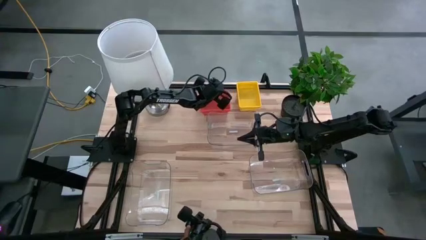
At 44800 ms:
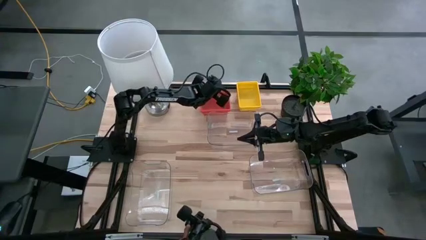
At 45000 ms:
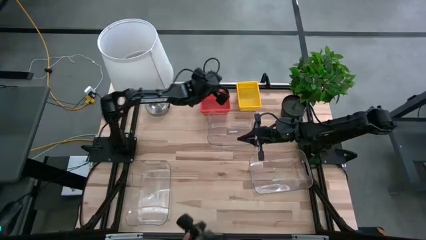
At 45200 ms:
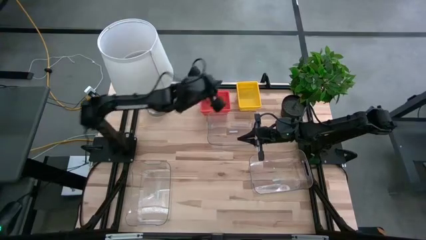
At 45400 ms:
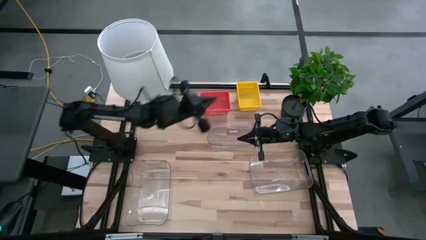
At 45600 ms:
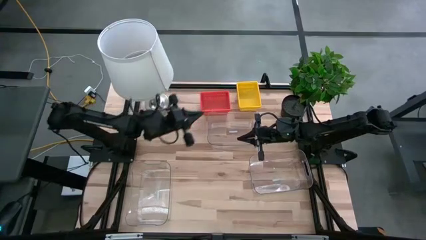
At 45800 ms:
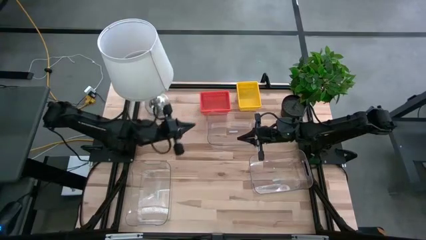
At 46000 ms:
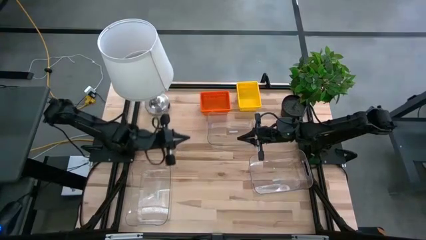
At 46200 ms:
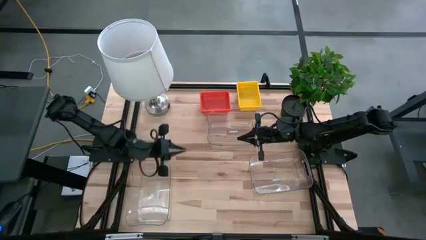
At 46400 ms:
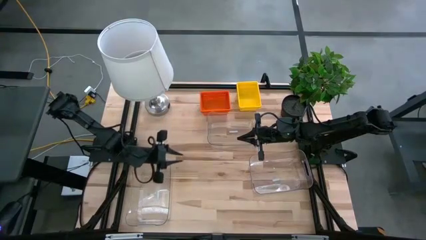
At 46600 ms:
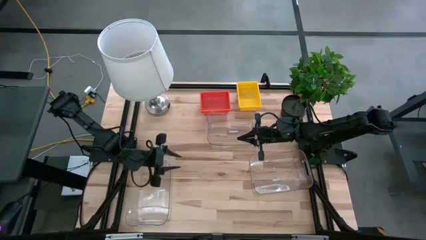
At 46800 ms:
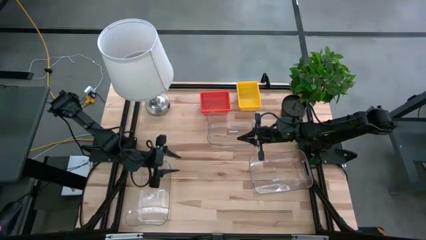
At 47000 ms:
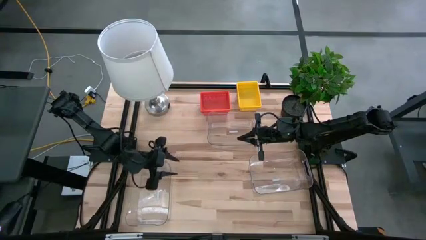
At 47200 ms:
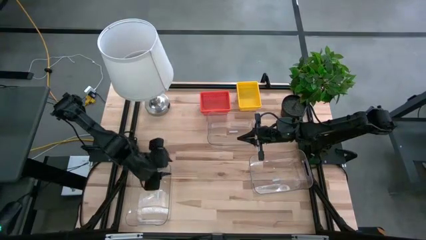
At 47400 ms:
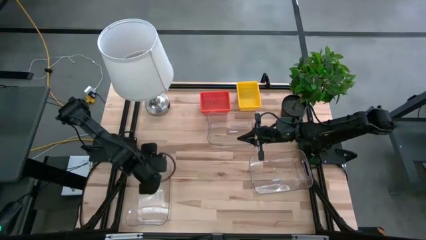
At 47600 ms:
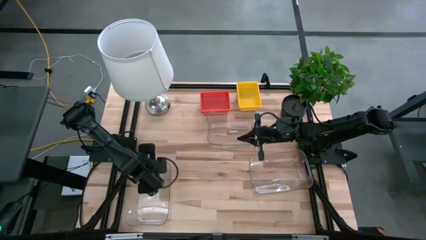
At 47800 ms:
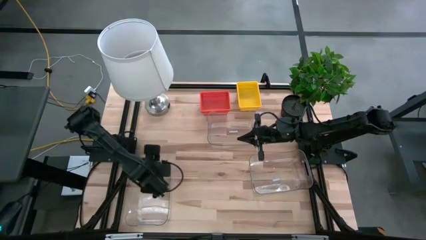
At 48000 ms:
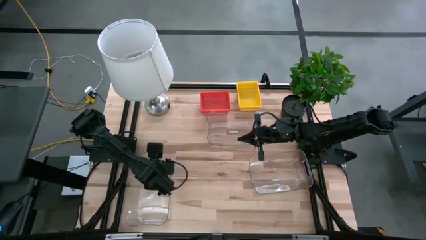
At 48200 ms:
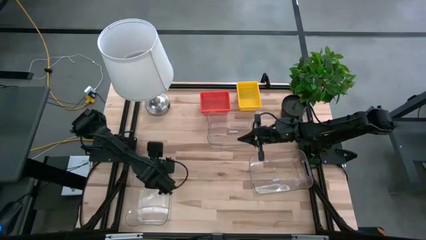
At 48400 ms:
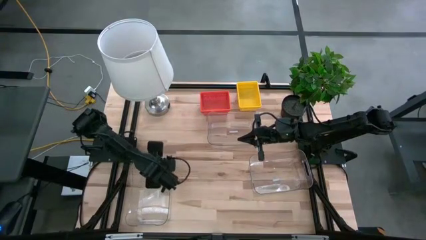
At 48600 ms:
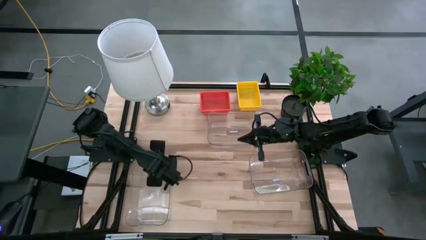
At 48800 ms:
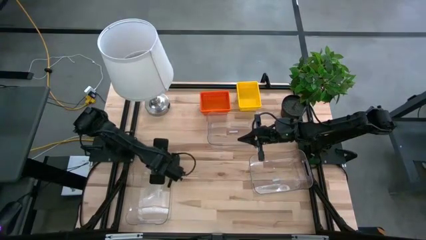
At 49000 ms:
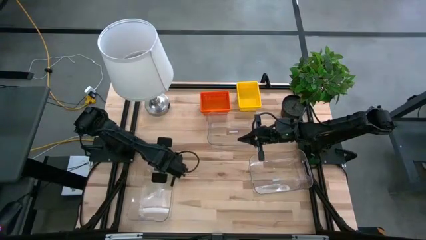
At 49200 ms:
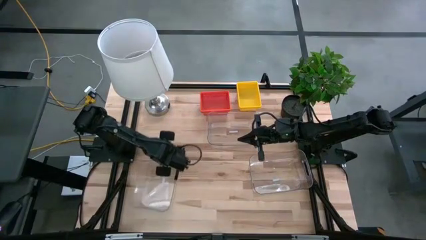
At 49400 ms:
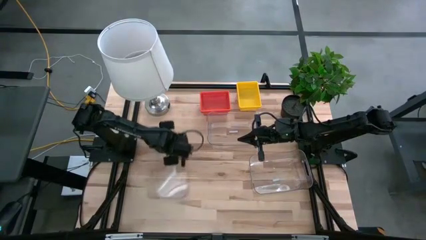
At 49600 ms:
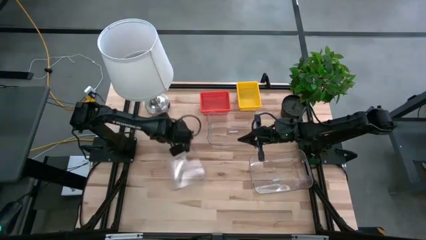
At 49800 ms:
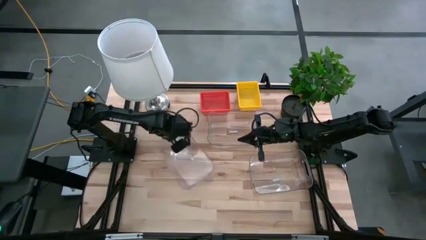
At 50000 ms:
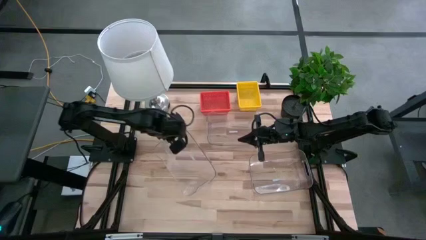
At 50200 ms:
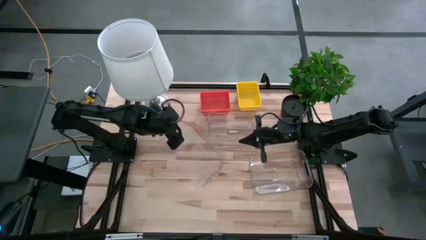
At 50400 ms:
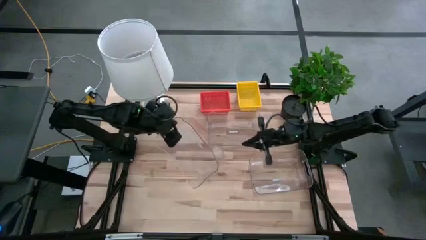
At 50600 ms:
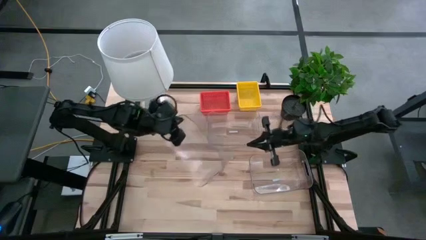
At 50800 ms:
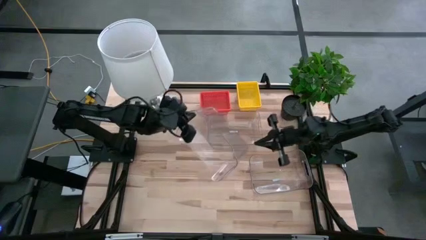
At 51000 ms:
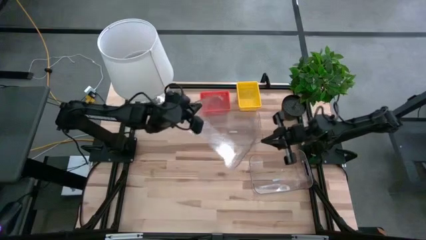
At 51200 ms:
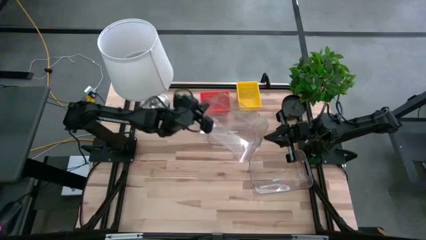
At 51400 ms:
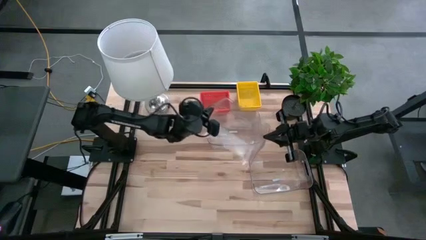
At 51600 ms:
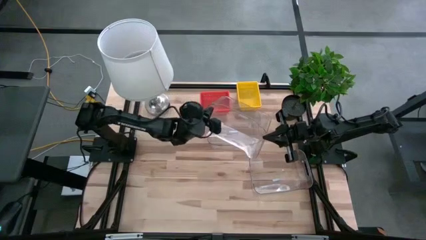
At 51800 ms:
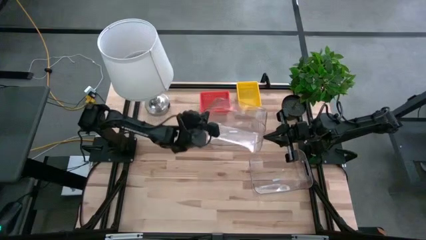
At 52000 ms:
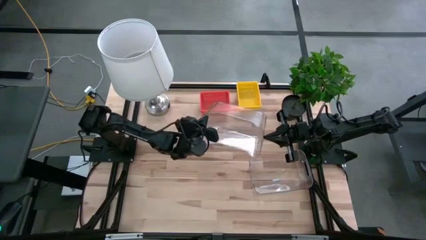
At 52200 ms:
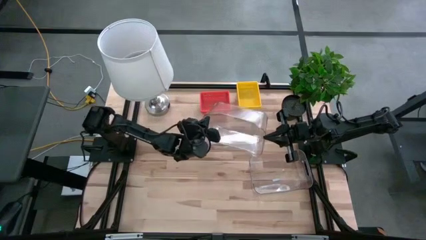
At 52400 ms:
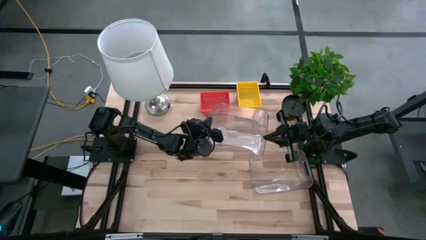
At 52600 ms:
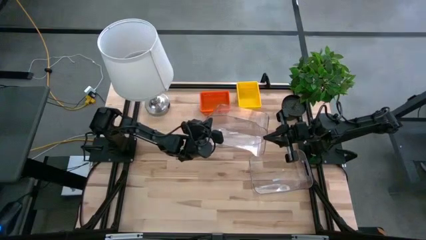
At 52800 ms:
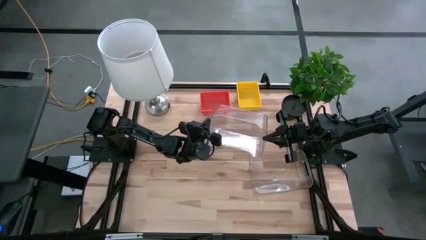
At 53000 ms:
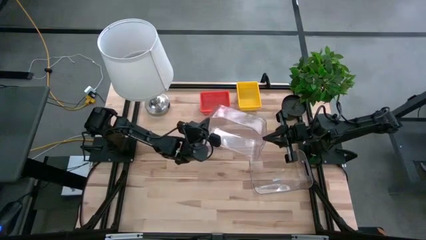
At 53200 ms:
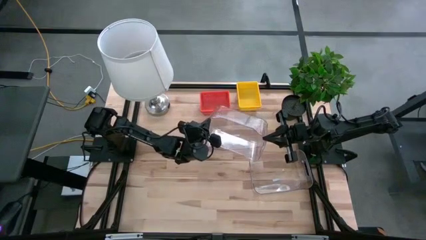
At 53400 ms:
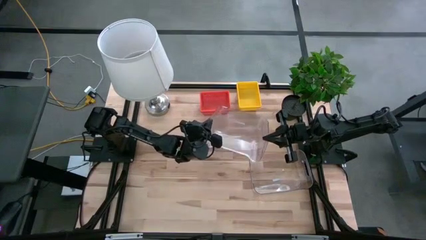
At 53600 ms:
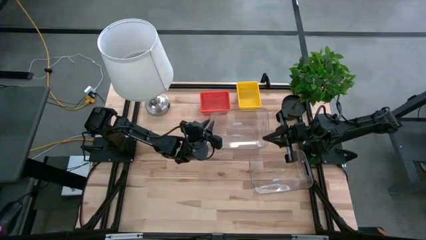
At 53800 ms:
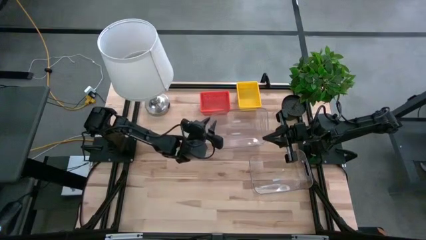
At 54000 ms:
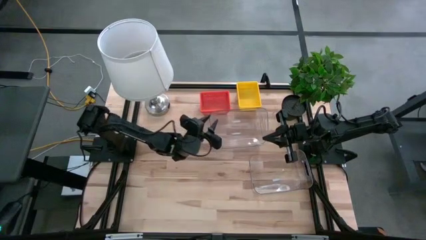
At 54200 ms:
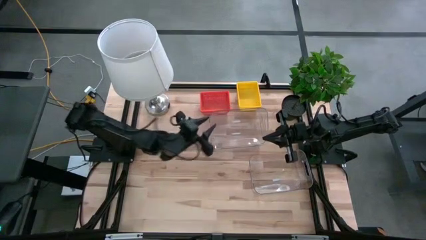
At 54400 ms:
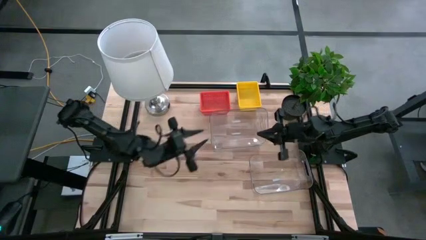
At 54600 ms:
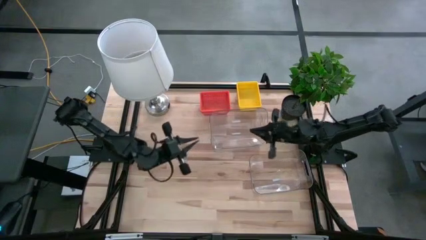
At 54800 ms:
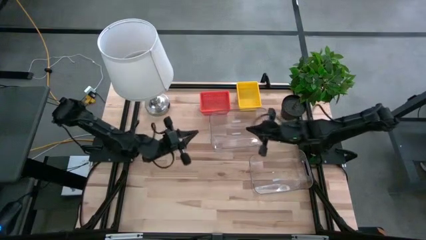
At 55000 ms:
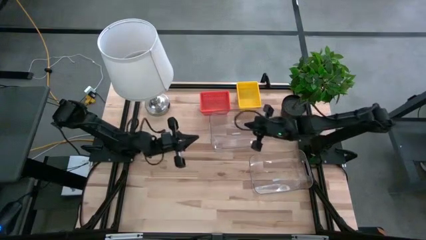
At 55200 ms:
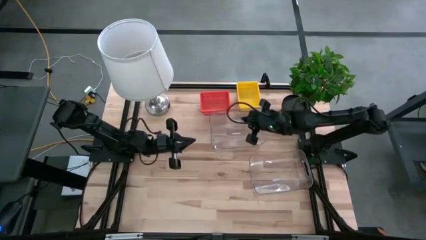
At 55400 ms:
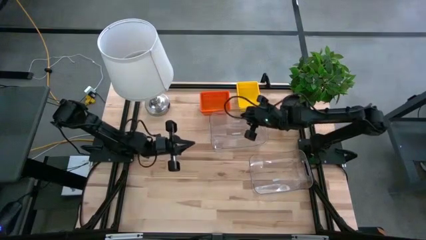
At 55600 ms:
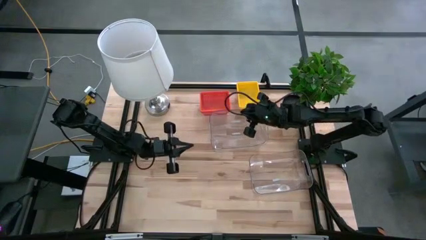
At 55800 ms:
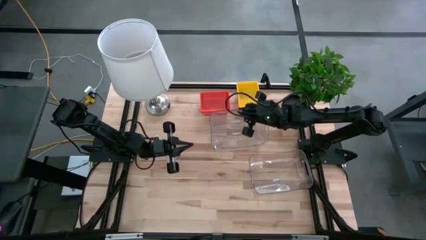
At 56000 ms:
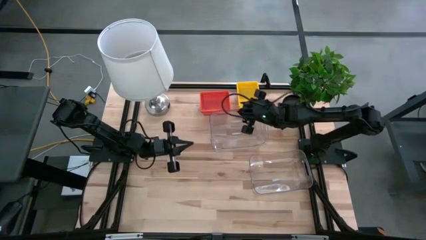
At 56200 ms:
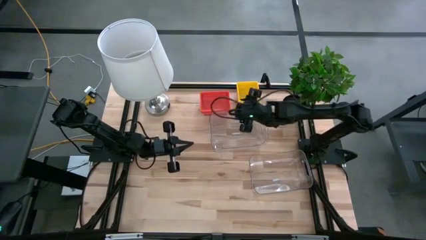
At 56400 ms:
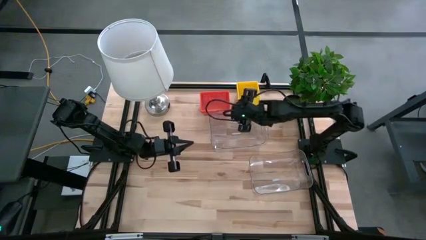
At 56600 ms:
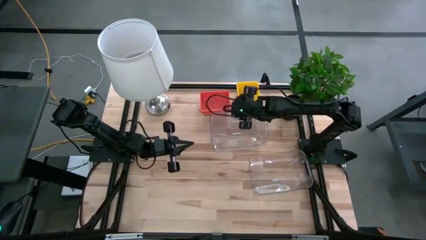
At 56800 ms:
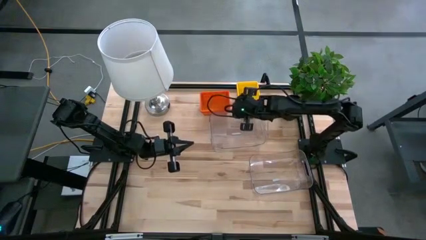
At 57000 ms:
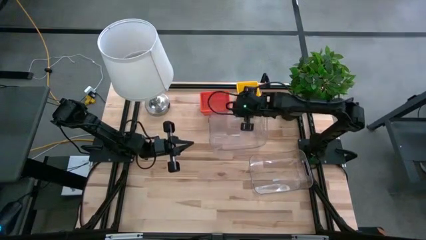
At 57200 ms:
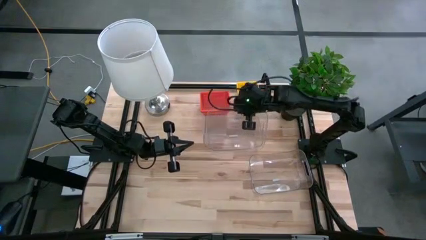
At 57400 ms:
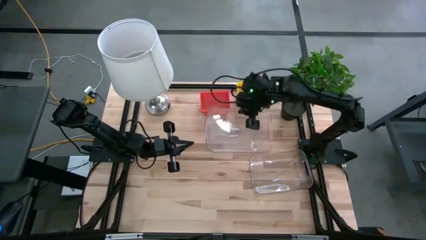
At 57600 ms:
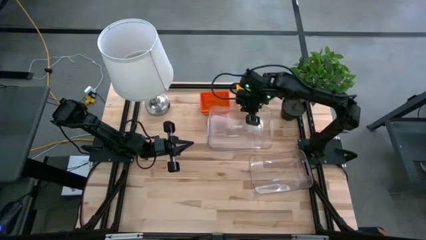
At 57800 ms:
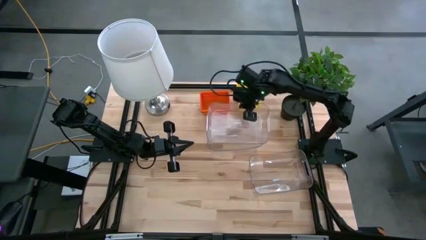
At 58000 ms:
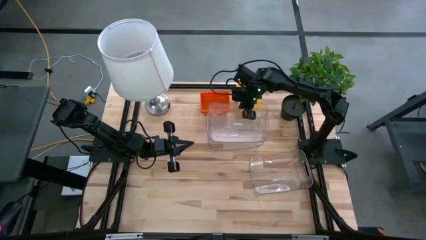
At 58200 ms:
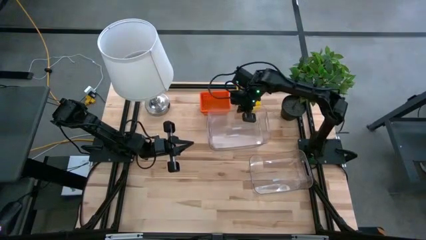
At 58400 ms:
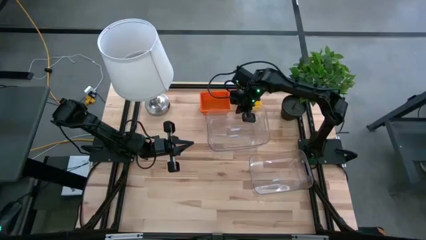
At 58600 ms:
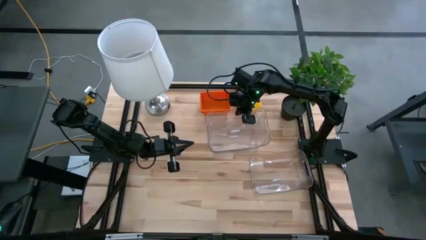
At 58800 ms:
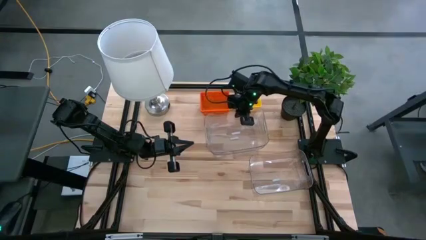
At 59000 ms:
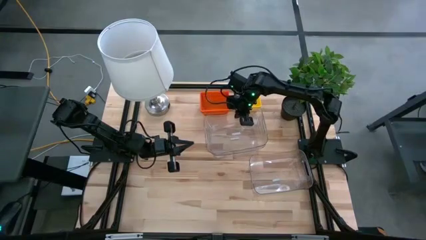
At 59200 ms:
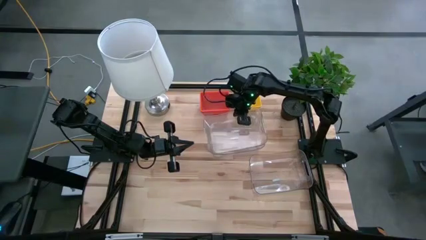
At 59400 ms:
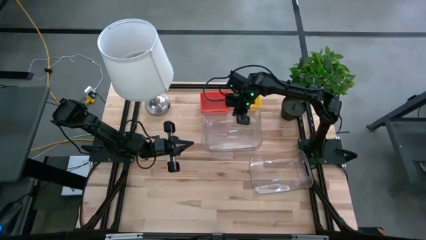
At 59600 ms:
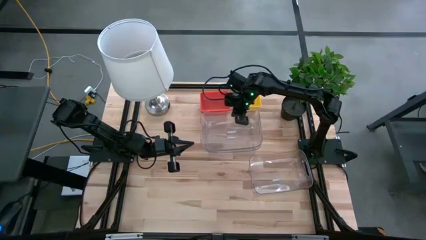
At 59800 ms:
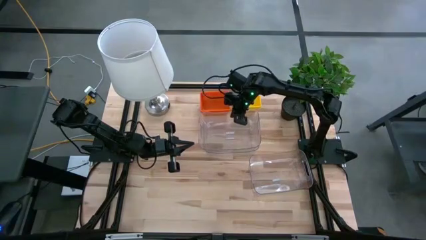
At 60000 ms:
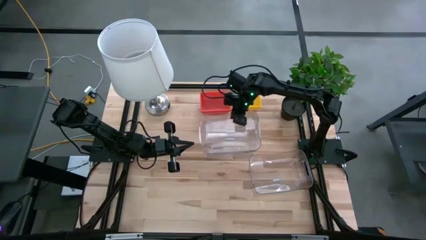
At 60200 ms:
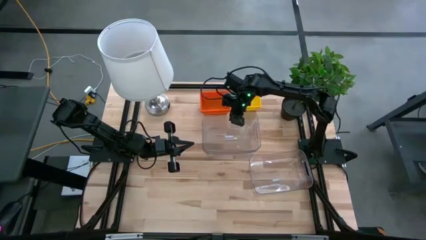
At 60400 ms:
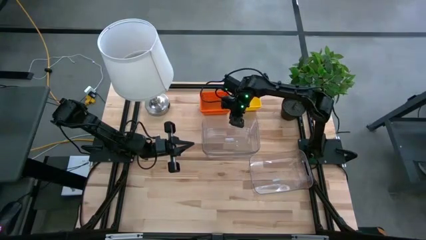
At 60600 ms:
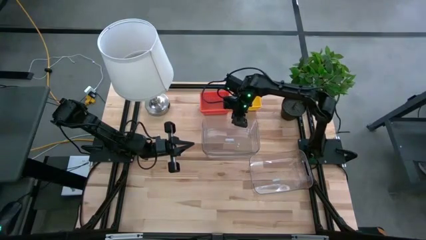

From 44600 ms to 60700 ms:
Stack the bottom left transparent bin on the top transparent bin
